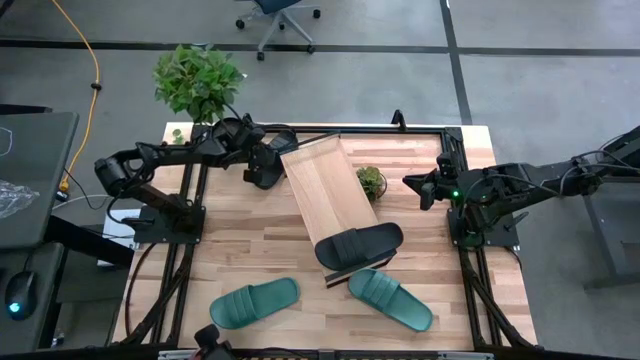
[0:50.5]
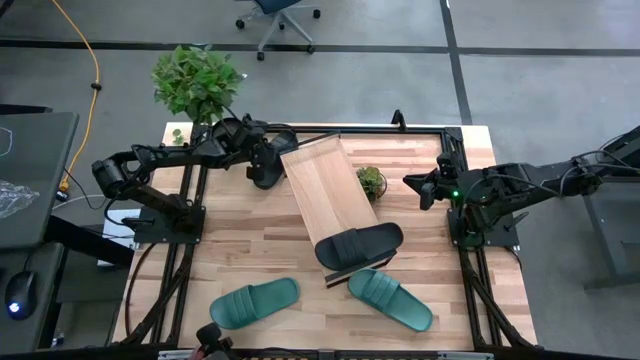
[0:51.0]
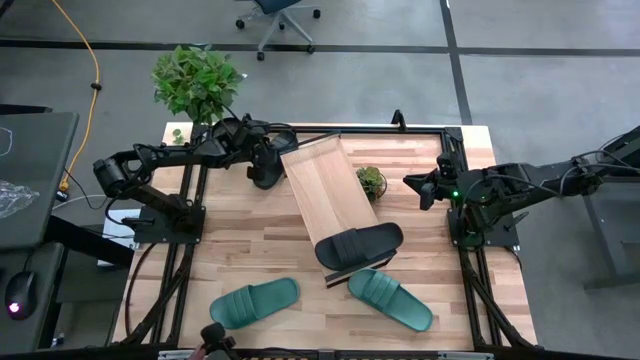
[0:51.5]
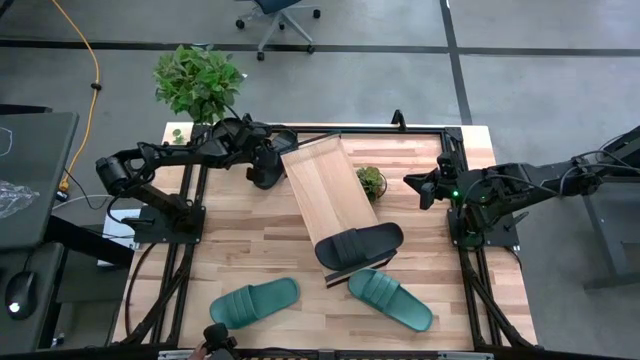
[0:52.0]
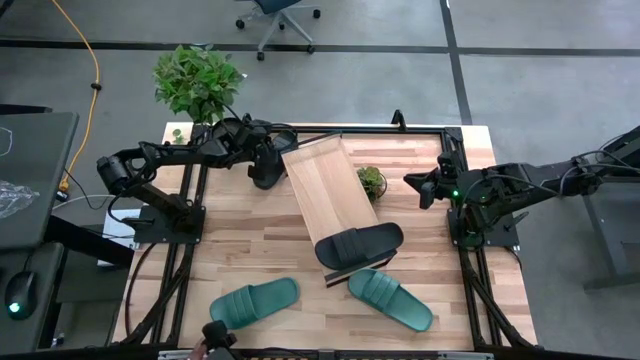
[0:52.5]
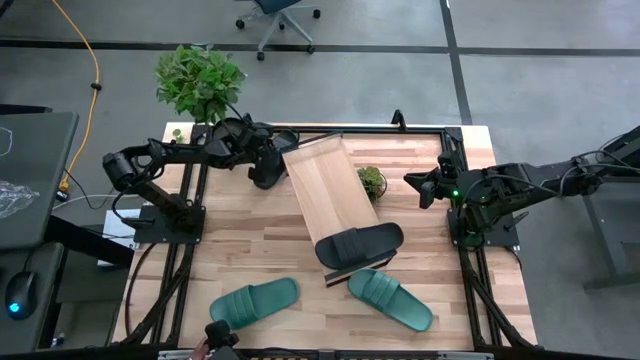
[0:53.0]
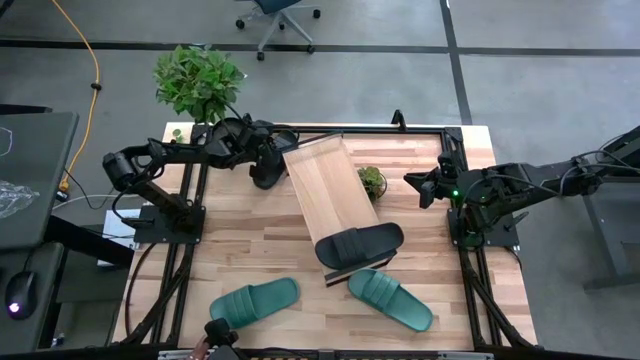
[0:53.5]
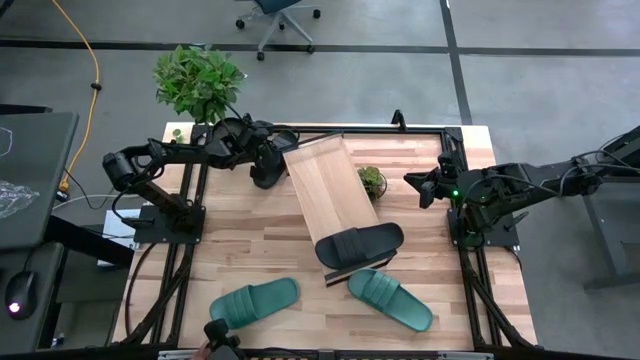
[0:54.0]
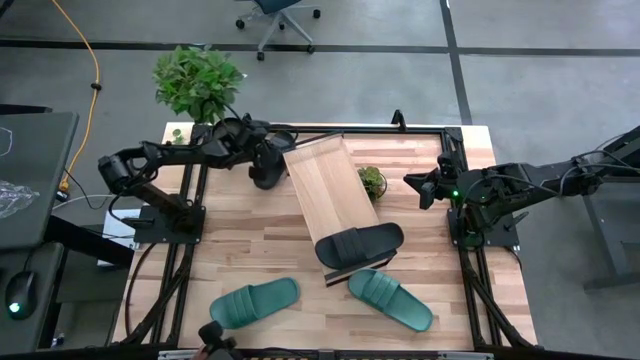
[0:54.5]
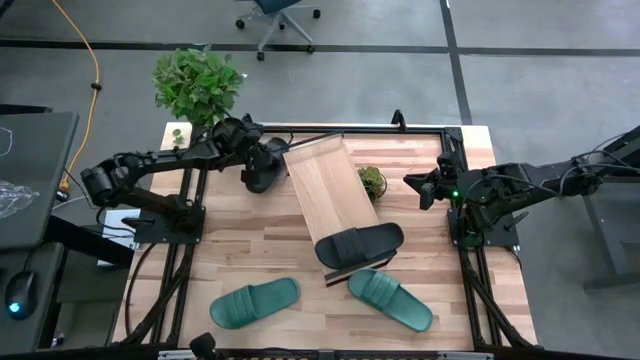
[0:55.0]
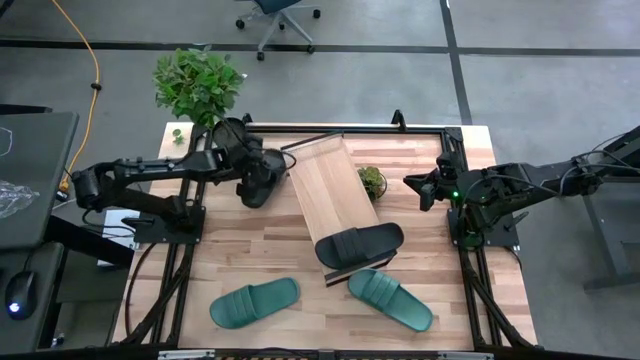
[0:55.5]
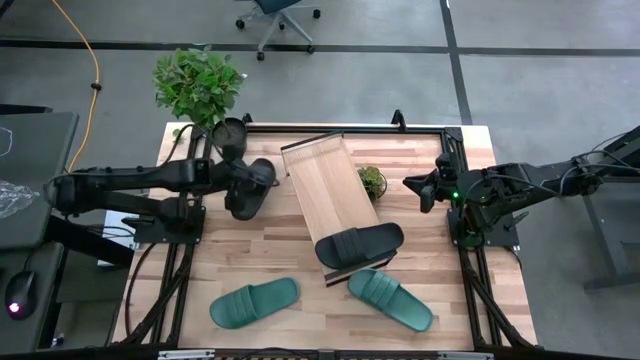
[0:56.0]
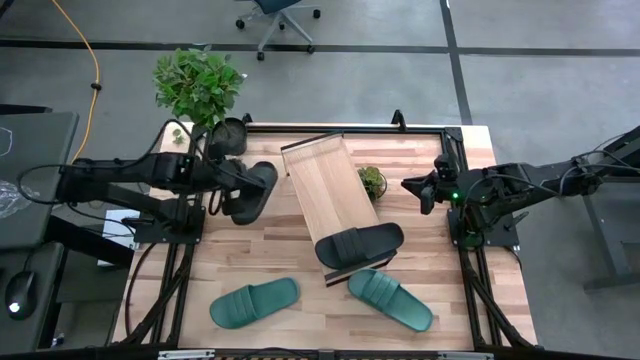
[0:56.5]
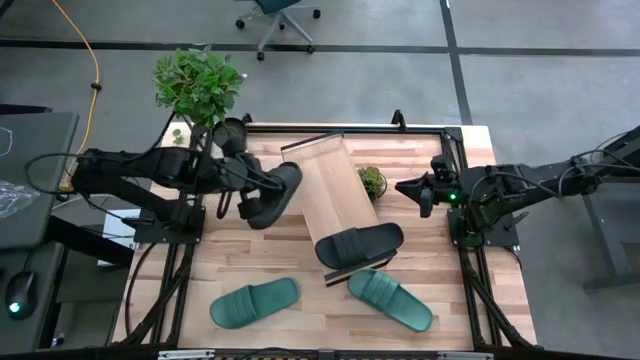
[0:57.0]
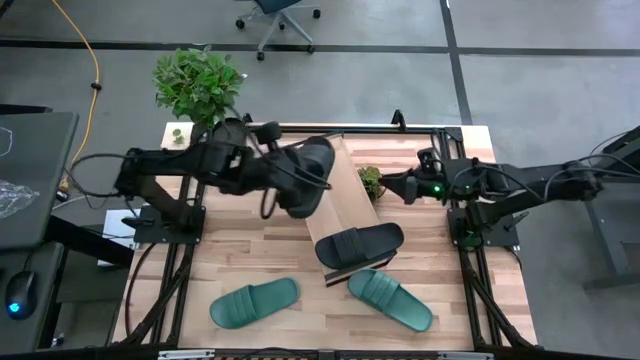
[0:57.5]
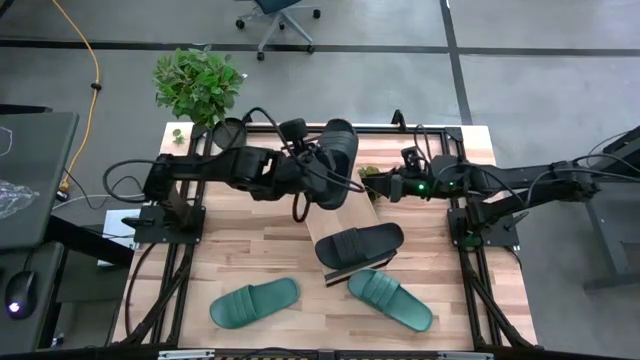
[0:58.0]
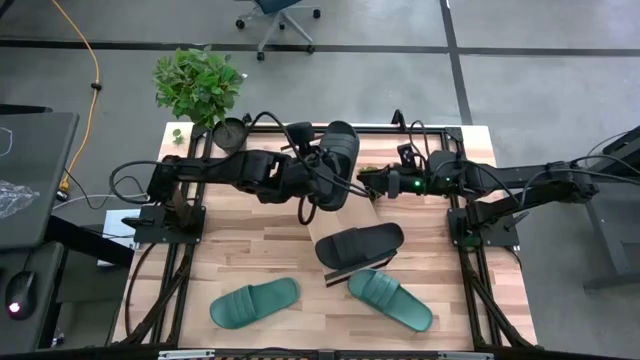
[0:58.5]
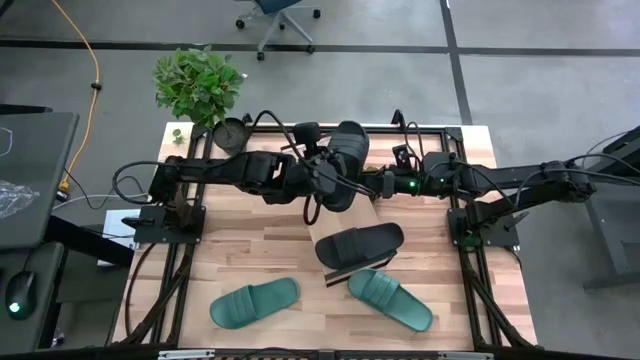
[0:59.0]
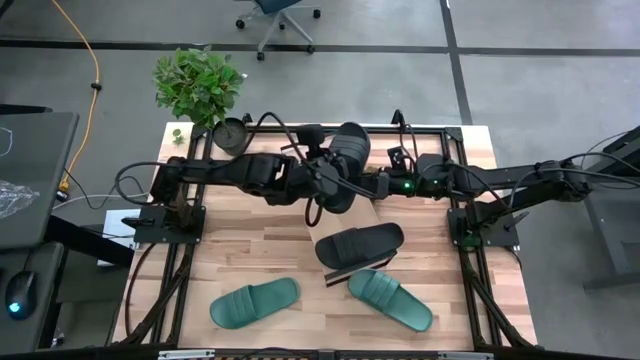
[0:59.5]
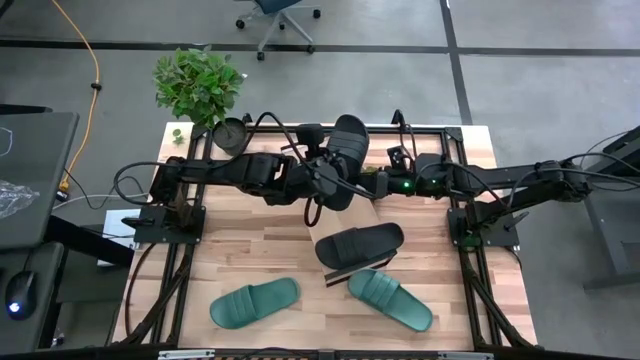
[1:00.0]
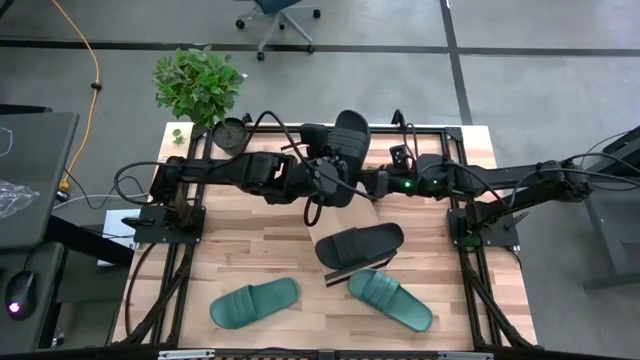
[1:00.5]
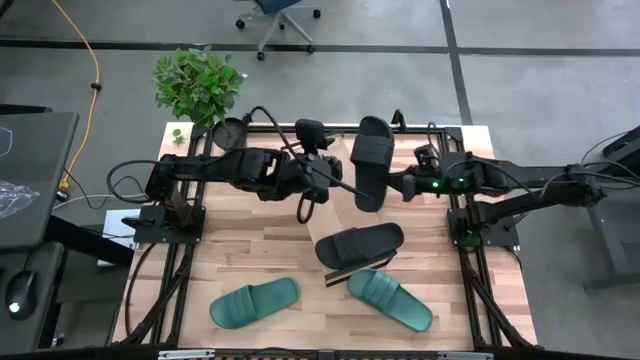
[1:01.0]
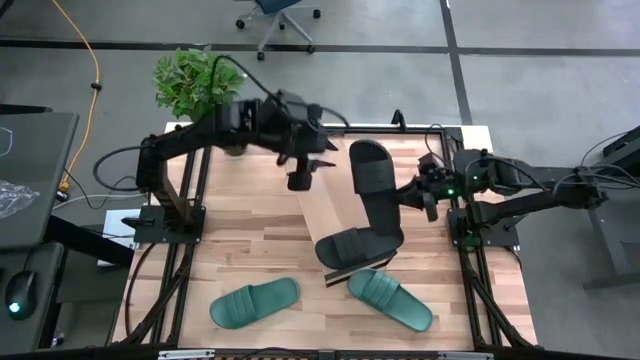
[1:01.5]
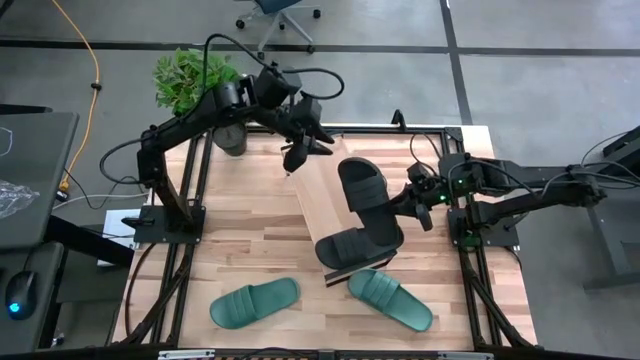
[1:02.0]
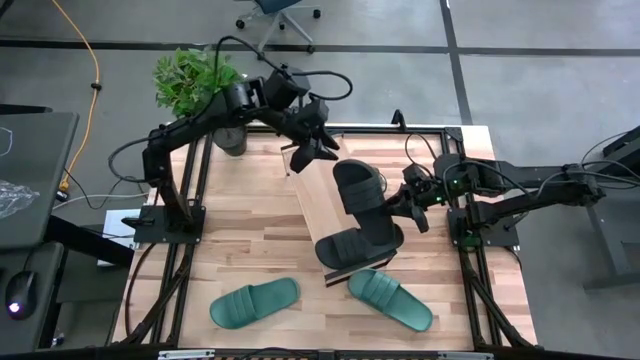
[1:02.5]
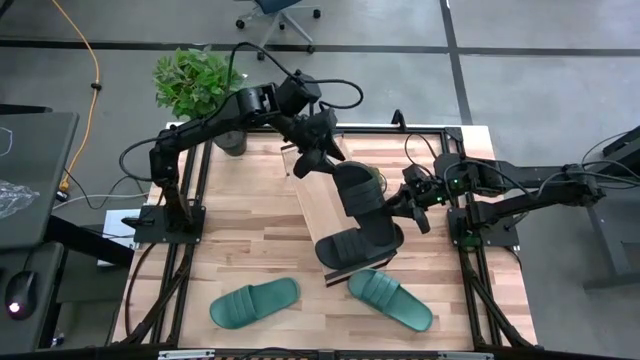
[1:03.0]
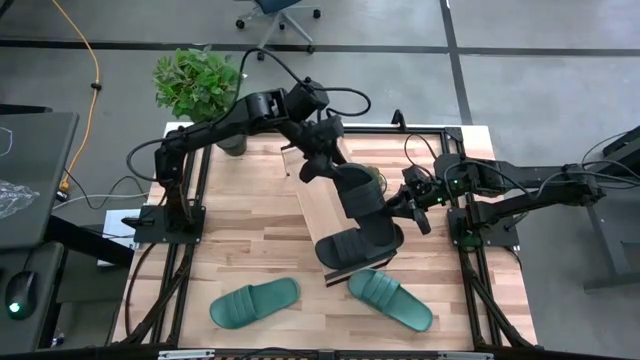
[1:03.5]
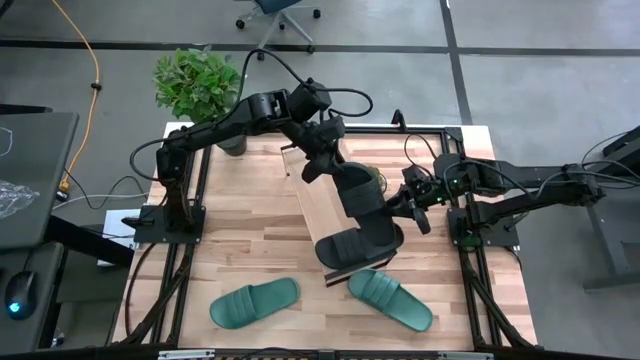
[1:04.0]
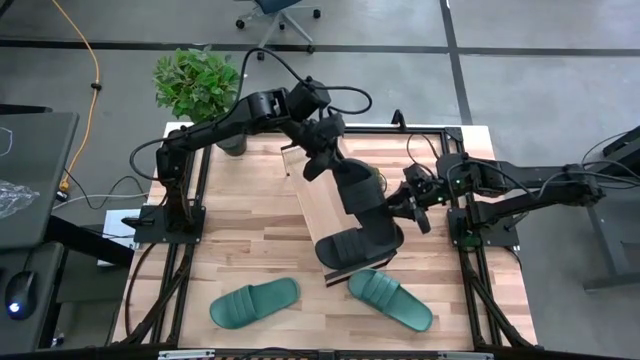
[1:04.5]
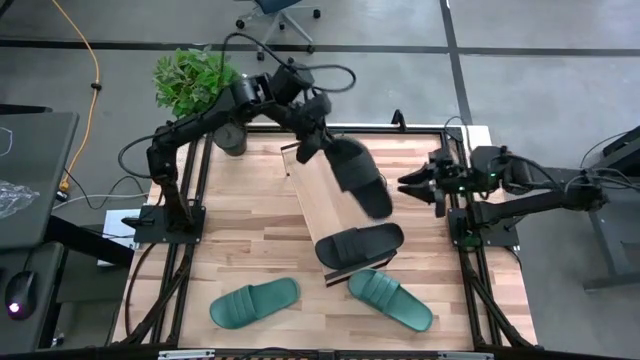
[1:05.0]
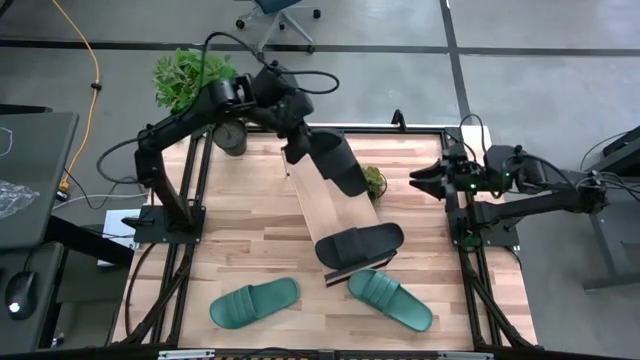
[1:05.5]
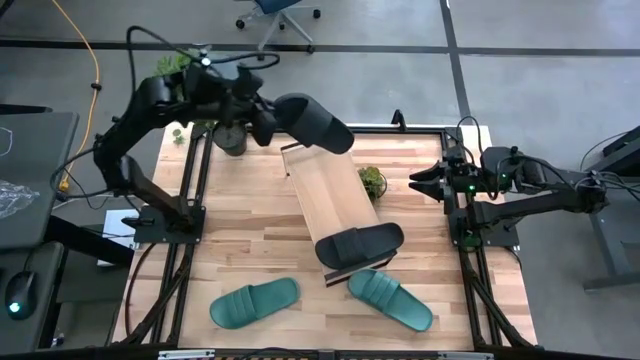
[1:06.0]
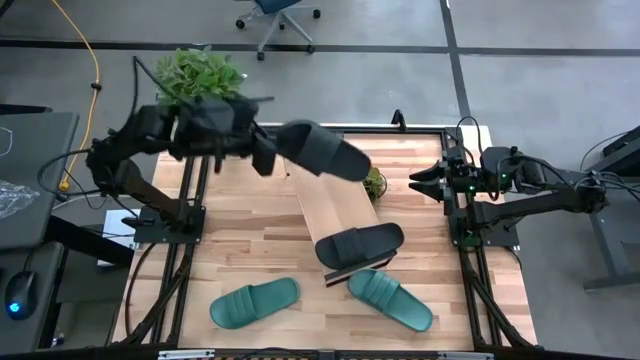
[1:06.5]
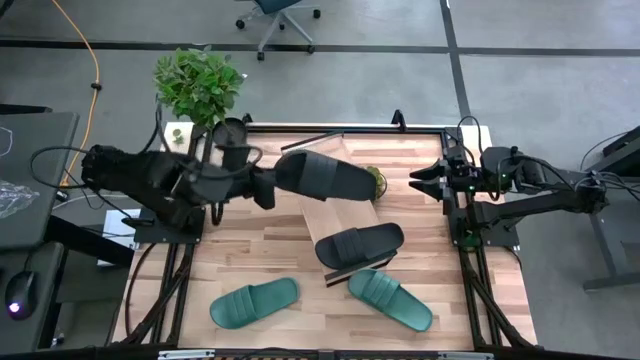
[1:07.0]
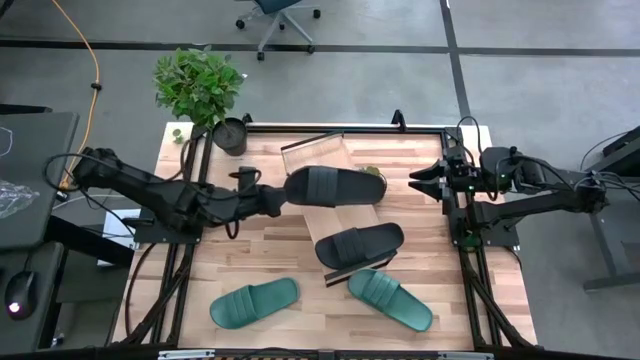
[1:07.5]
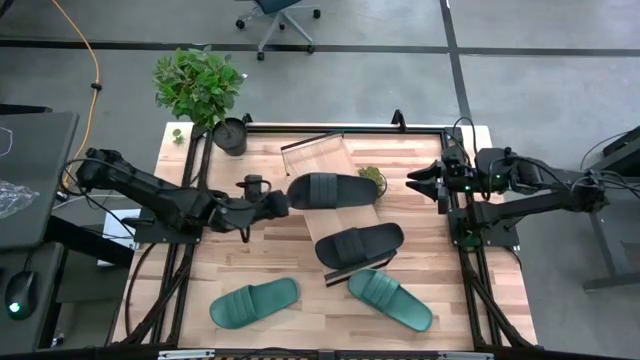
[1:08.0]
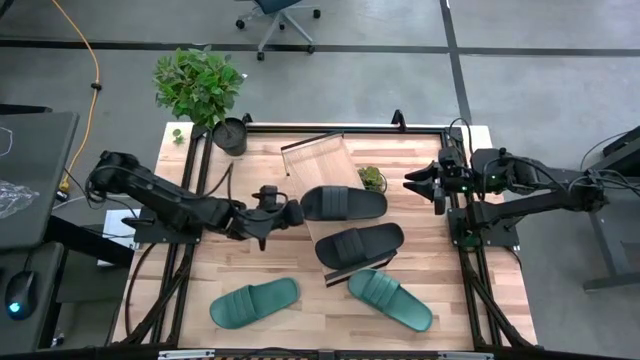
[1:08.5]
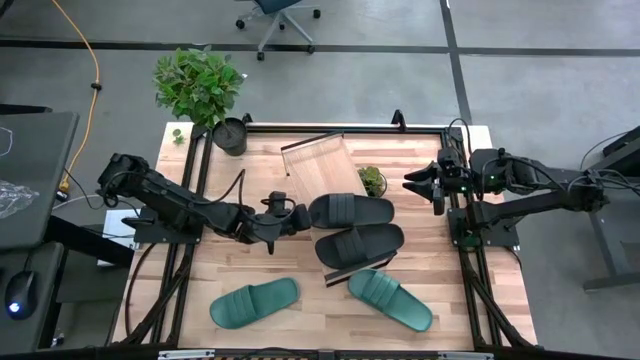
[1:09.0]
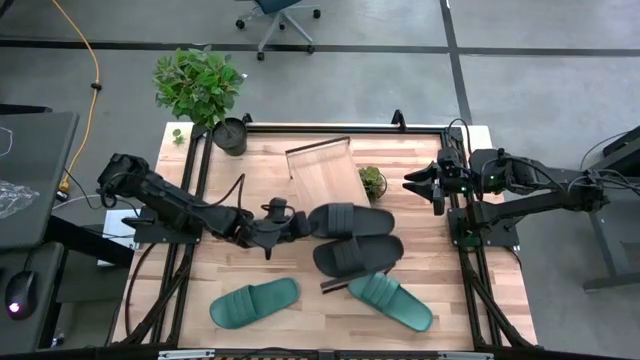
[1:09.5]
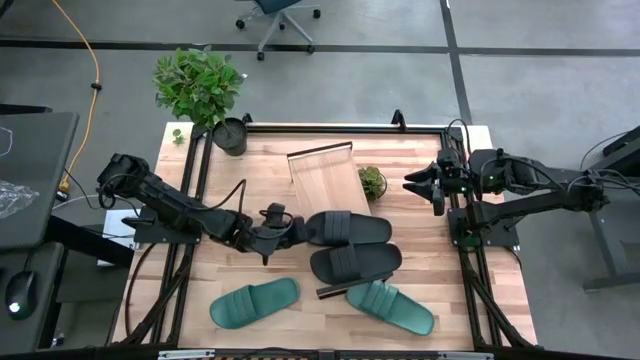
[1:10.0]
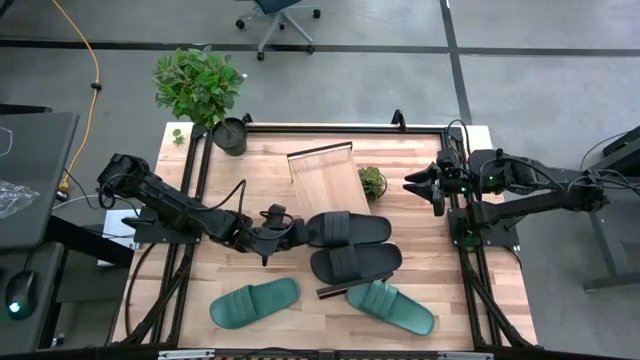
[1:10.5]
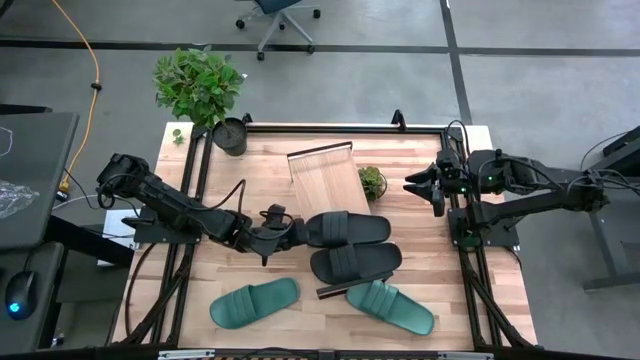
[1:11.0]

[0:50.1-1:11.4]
Task: Pick and place slides into the shelf
Put the black slipper on the shelf
